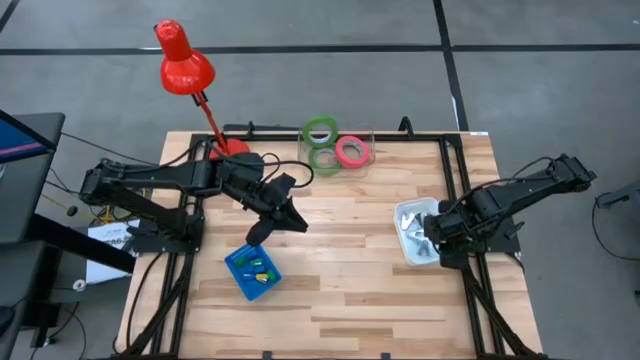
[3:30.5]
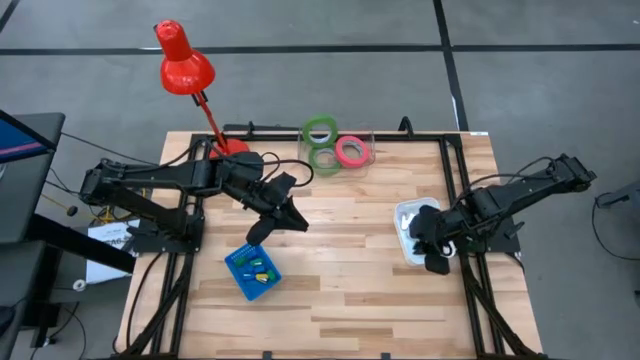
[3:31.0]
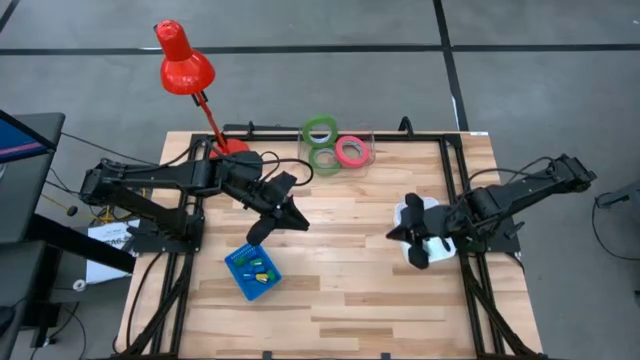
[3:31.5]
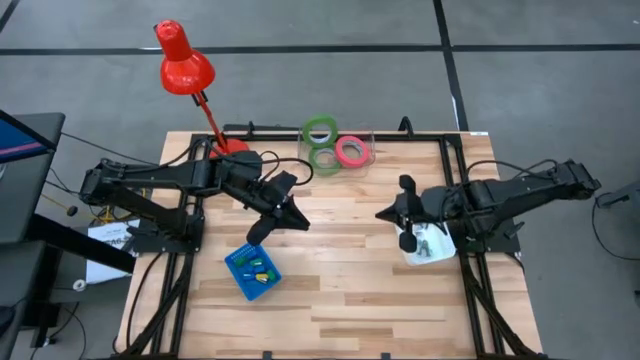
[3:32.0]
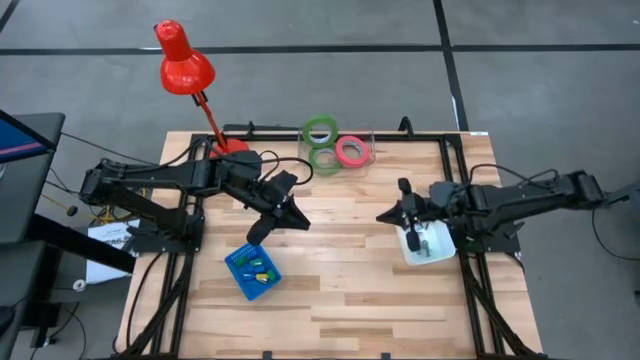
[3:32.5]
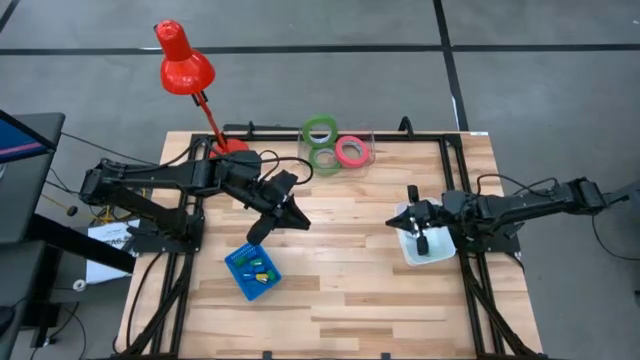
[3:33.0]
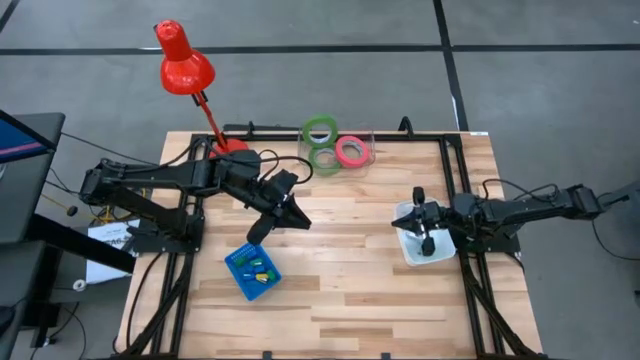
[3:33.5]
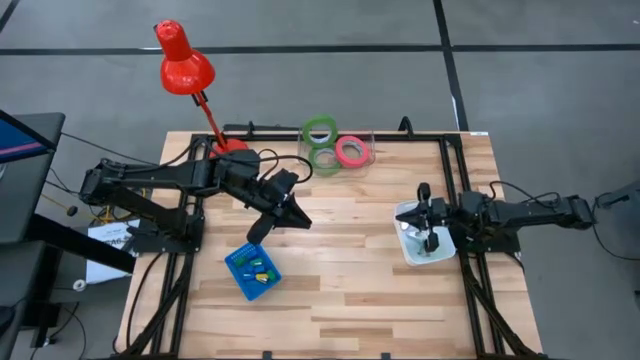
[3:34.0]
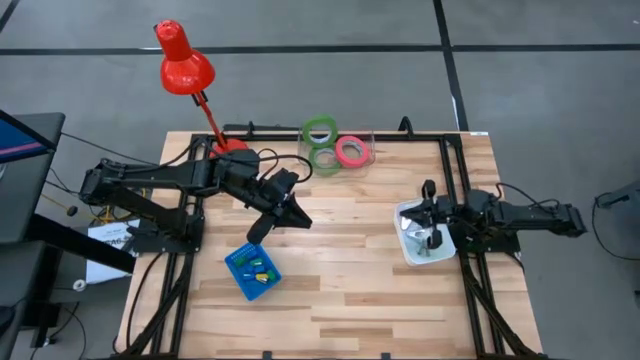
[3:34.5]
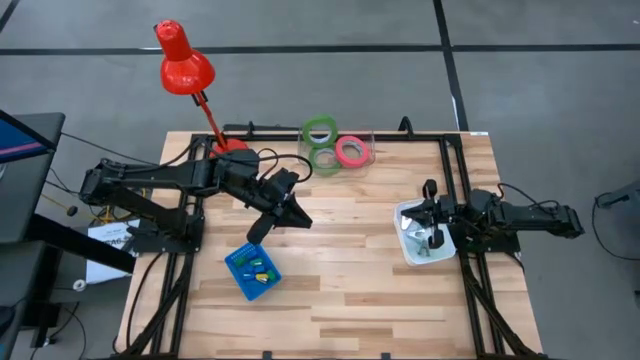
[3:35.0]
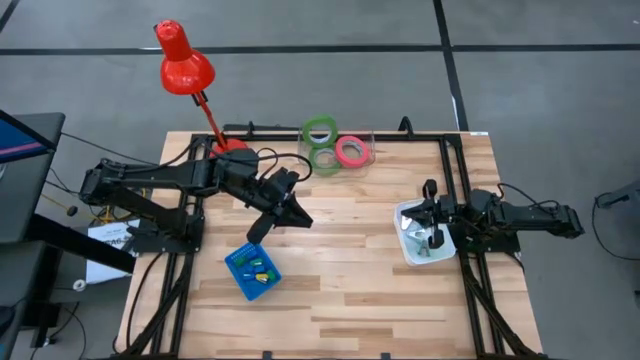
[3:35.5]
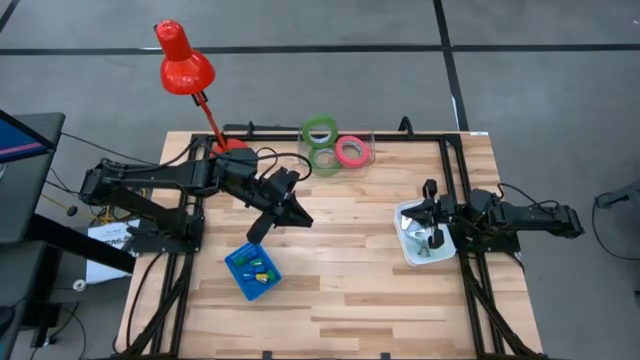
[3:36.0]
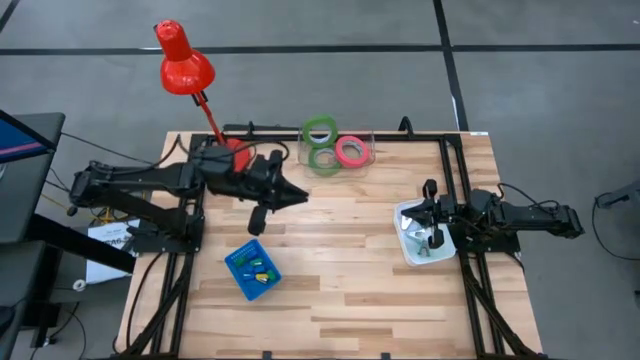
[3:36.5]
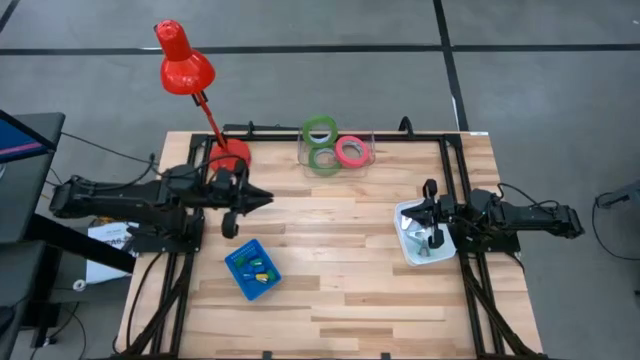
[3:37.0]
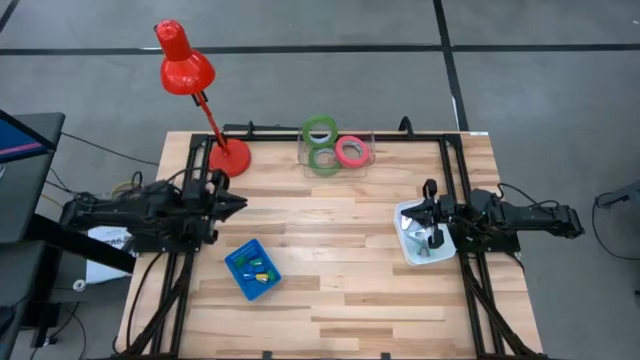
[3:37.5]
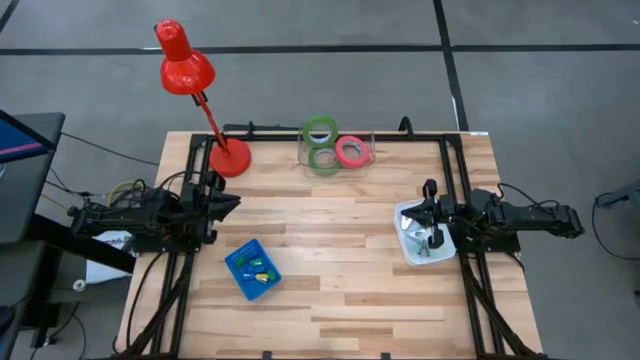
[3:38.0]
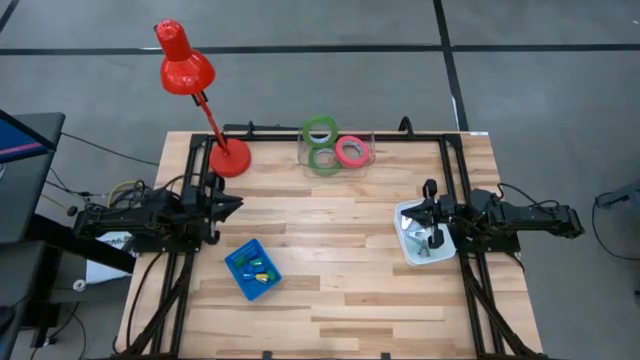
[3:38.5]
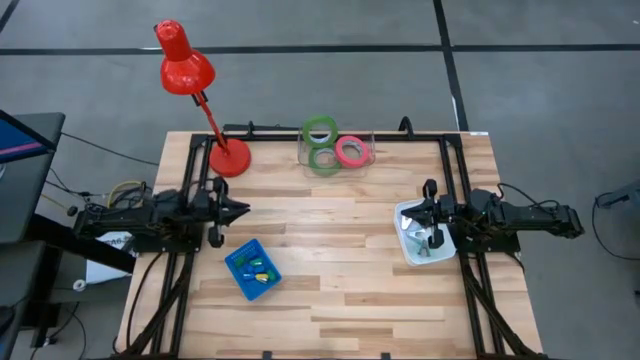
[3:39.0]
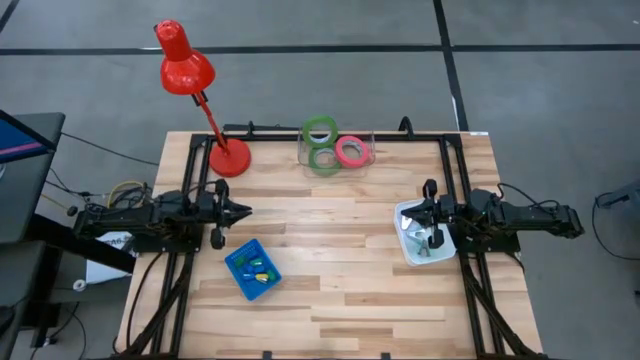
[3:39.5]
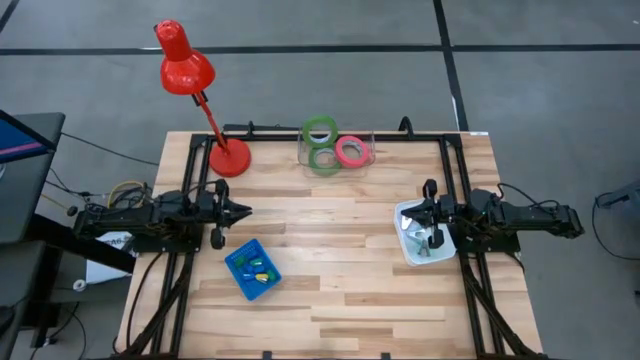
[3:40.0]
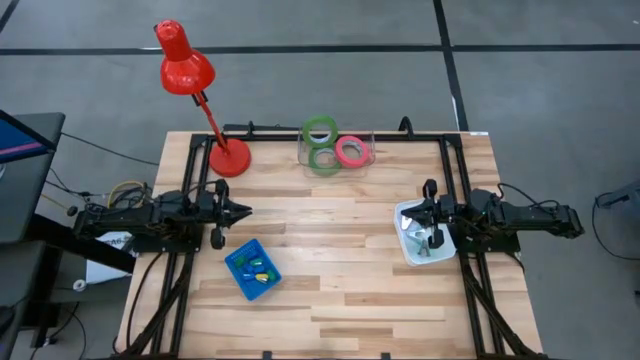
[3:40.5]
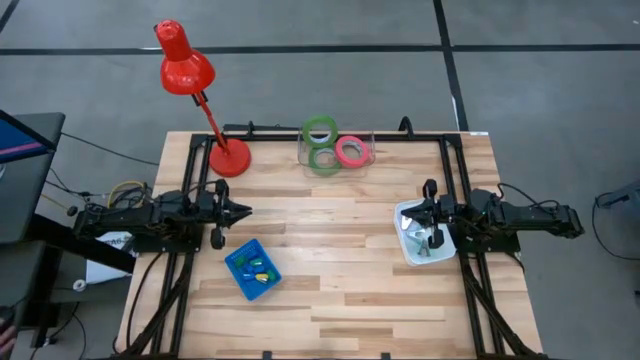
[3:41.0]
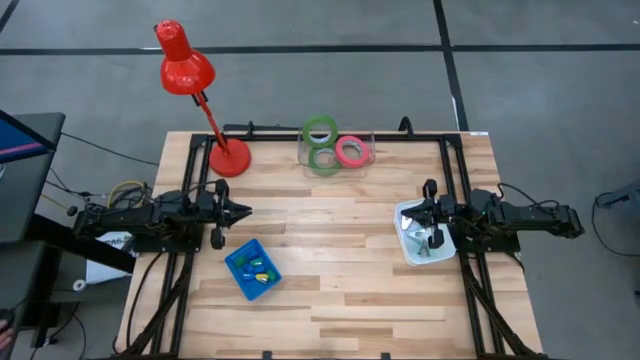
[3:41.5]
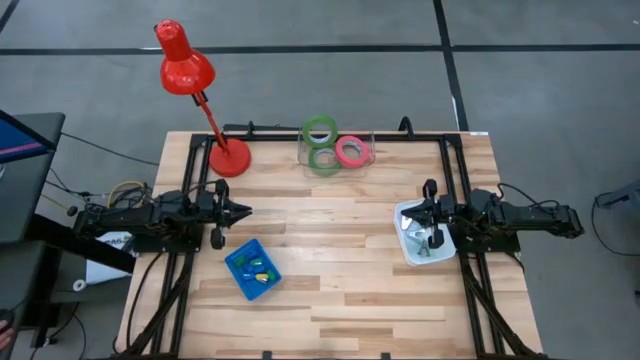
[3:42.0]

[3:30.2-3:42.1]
Task: Pick and place Stapler, Stapler remover, tape
Return to Home Position

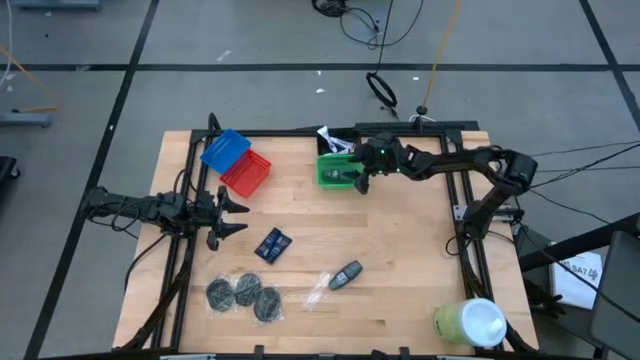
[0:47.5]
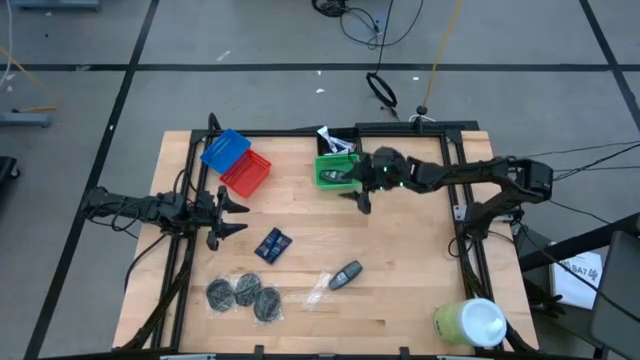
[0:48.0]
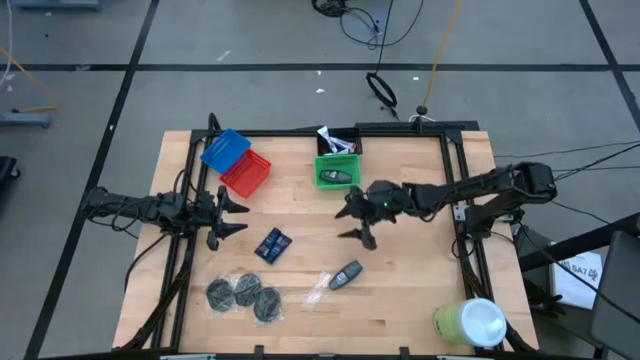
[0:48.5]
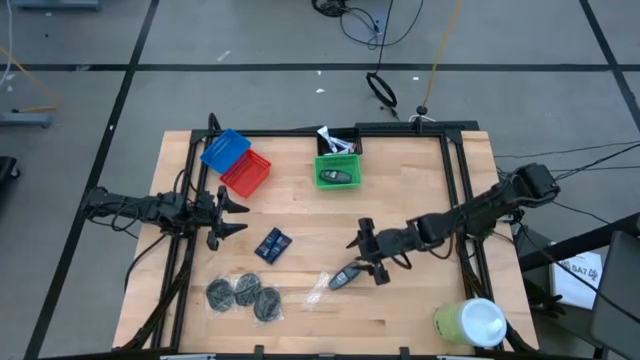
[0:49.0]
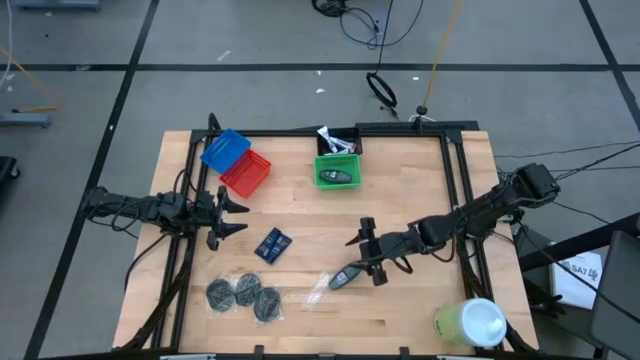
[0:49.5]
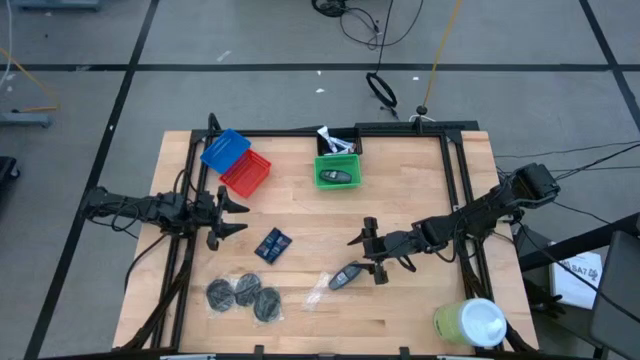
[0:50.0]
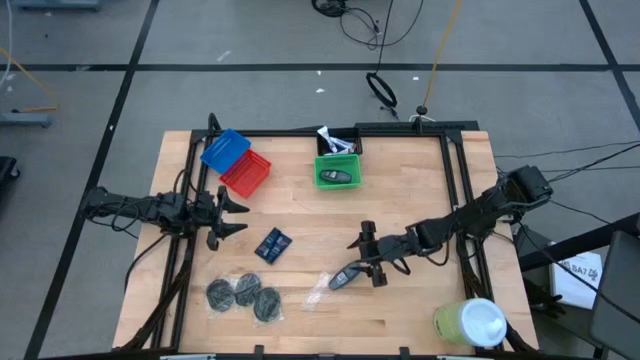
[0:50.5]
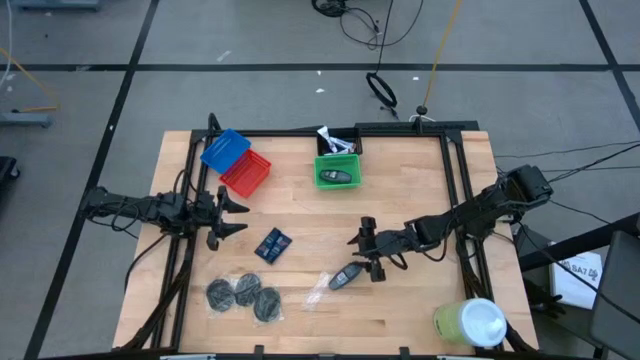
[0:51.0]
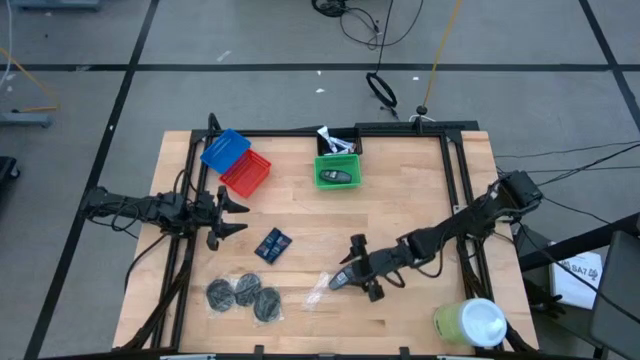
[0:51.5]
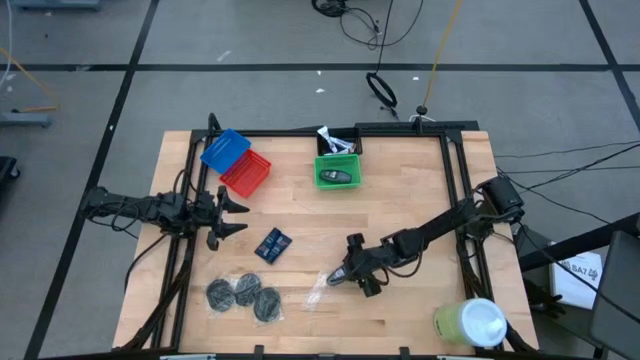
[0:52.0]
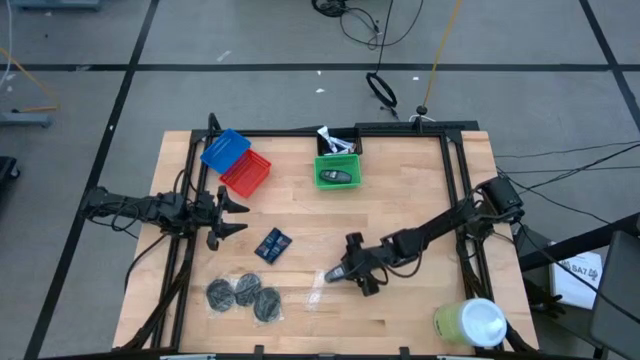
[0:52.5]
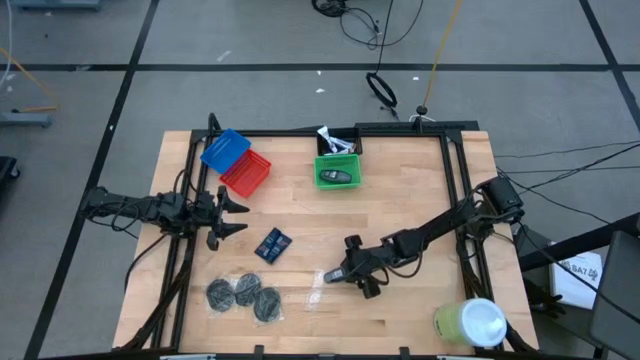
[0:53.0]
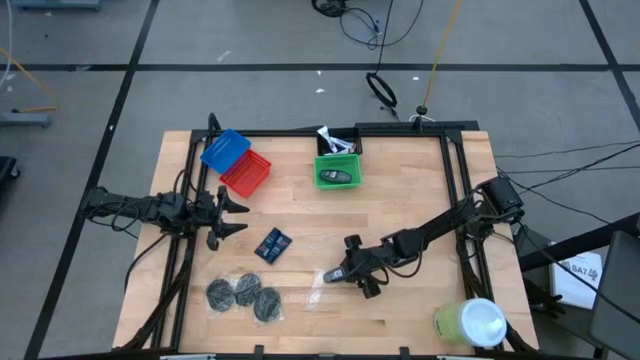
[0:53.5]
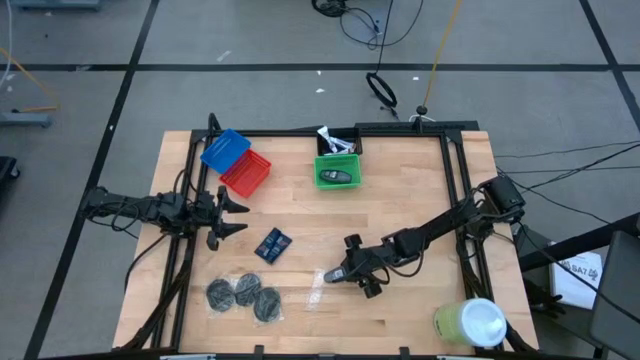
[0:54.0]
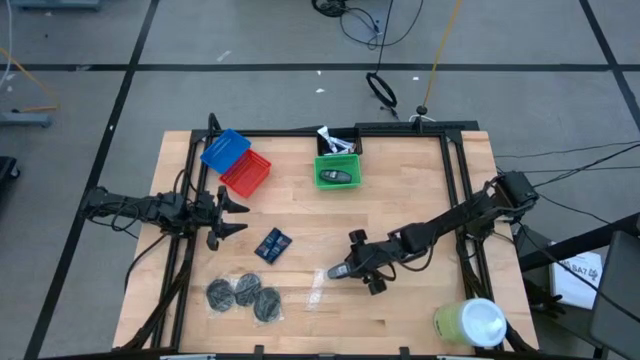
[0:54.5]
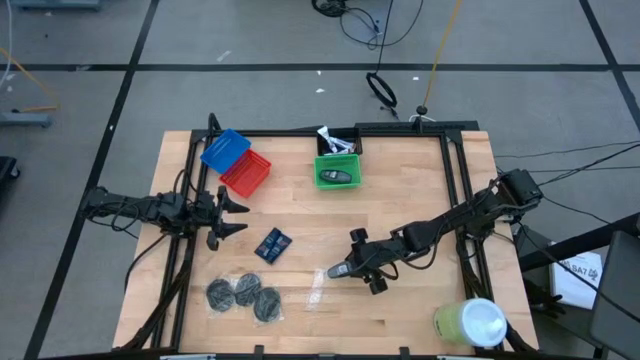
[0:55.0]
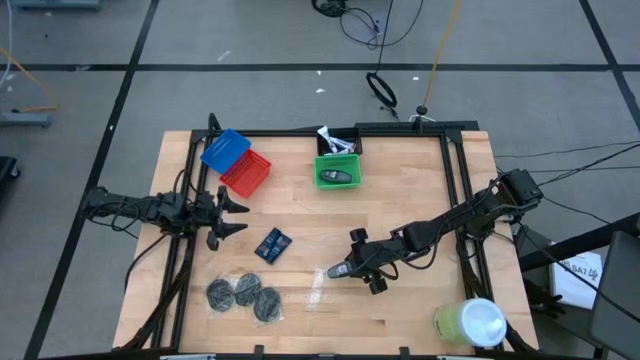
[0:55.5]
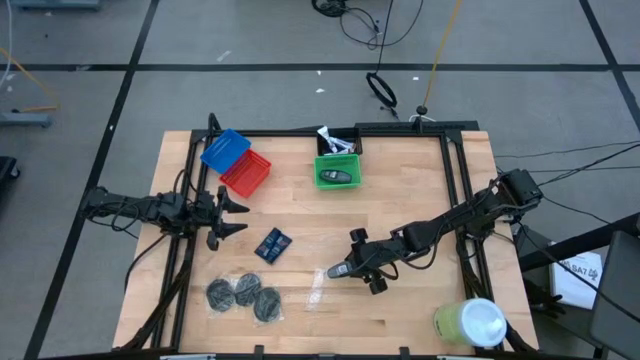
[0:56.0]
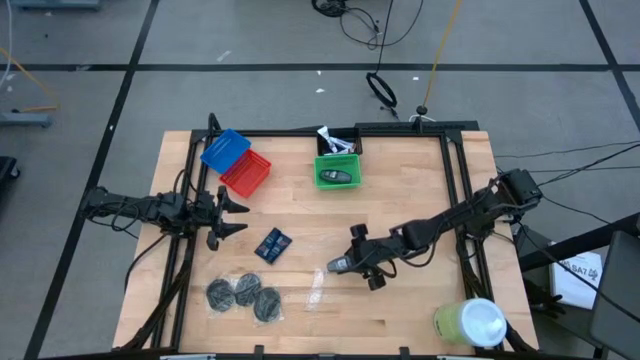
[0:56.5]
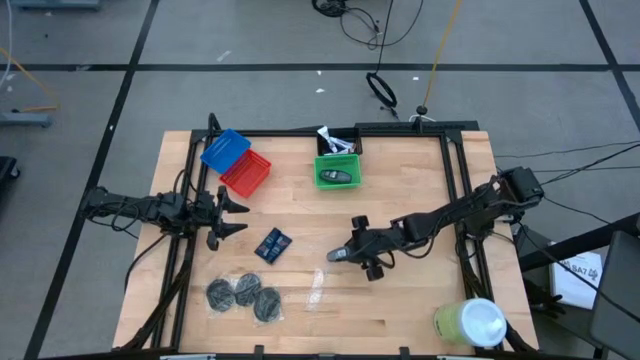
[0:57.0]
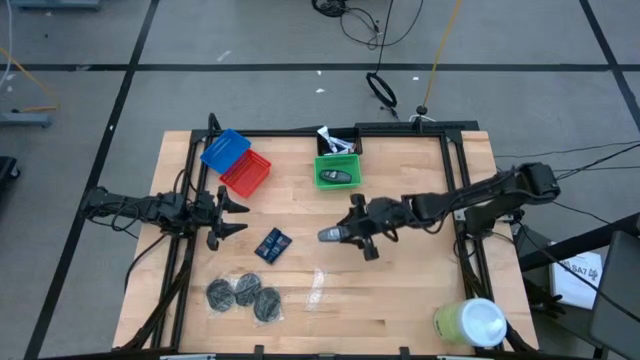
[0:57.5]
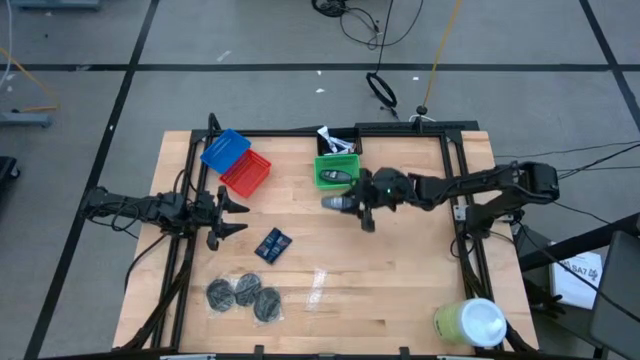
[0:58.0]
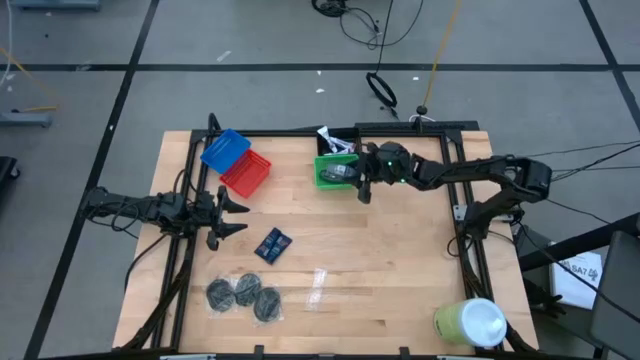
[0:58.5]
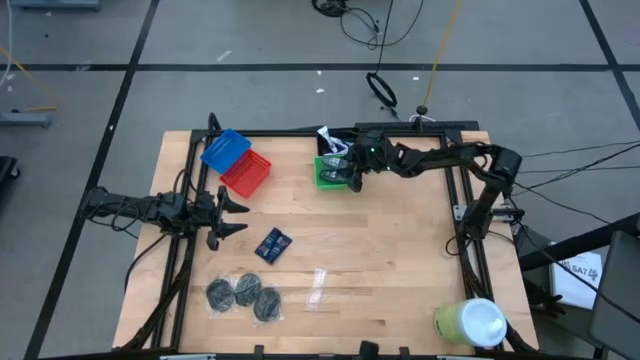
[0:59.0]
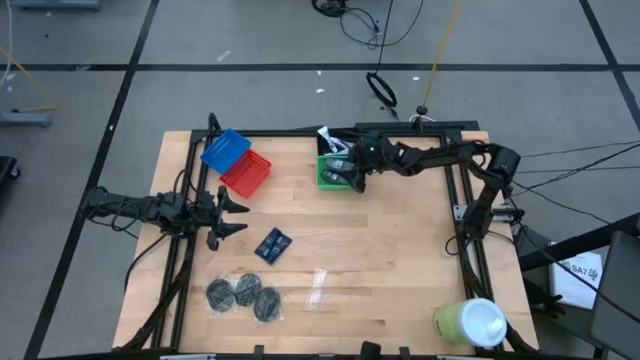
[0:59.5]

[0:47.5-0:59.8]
Task: Pick & Place Travel size toiletries
Put the gray deodorant into the green bin
